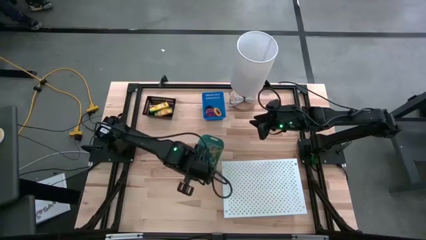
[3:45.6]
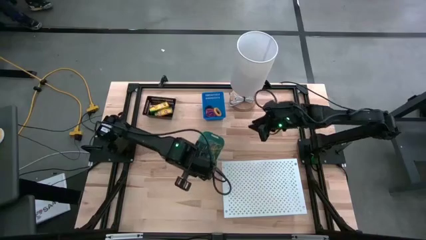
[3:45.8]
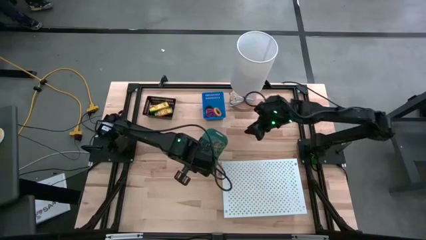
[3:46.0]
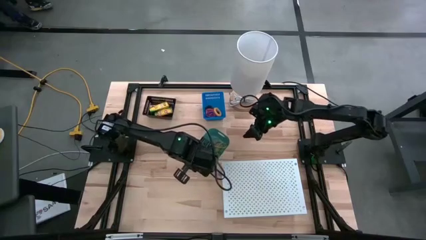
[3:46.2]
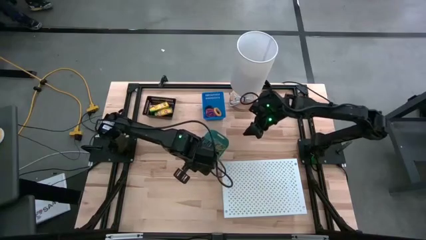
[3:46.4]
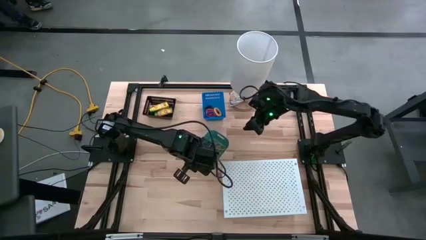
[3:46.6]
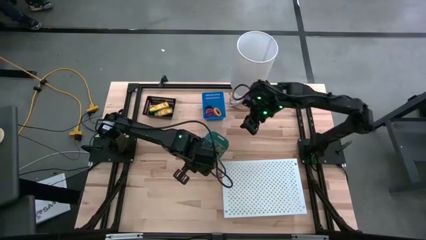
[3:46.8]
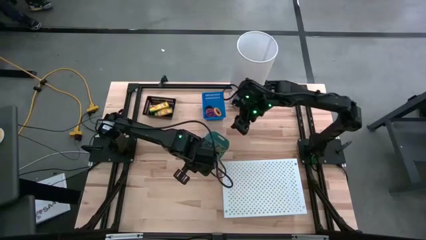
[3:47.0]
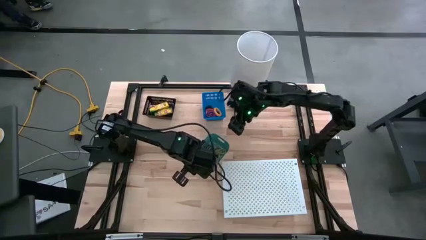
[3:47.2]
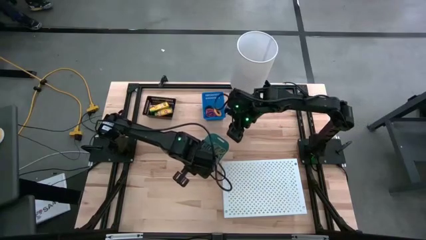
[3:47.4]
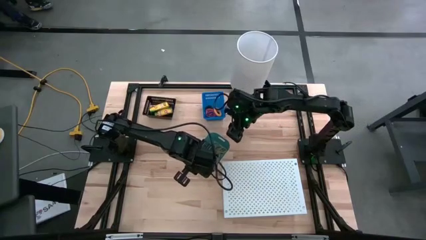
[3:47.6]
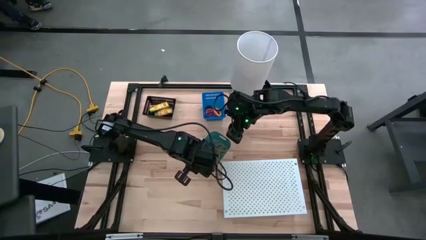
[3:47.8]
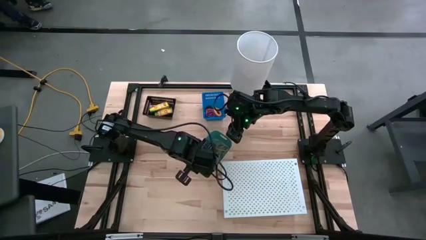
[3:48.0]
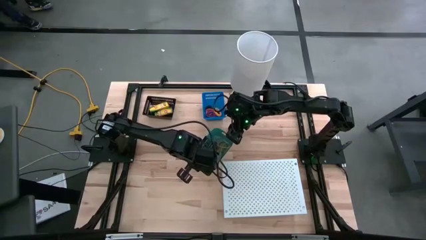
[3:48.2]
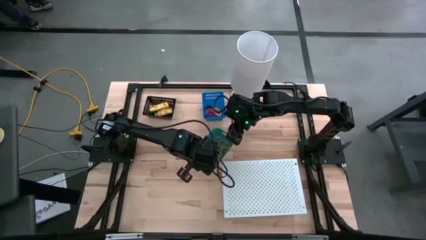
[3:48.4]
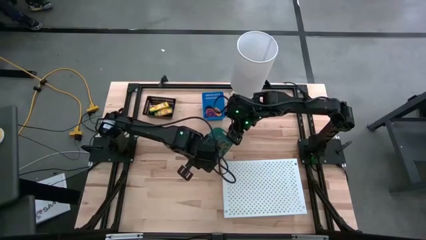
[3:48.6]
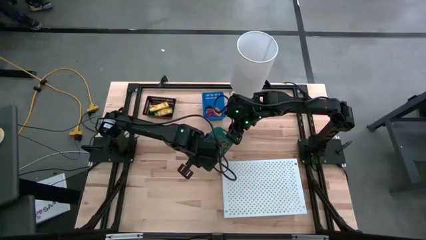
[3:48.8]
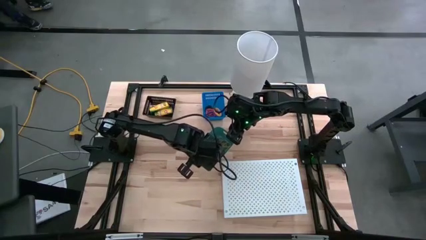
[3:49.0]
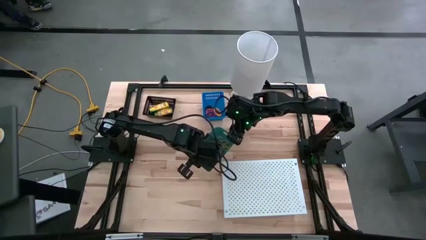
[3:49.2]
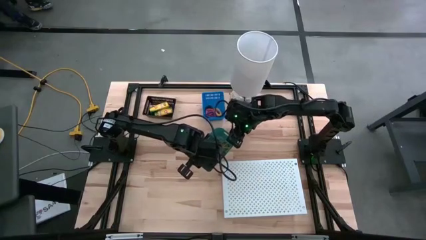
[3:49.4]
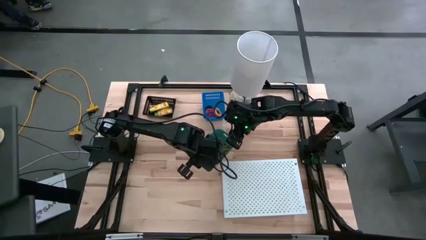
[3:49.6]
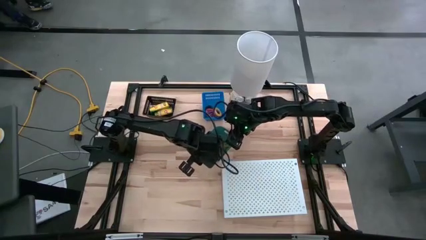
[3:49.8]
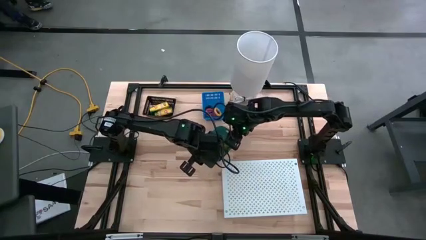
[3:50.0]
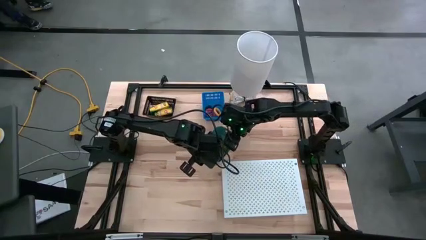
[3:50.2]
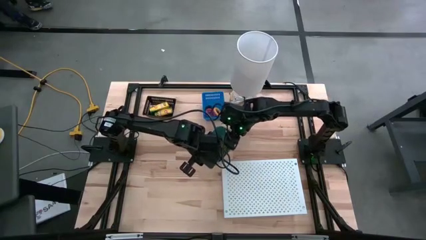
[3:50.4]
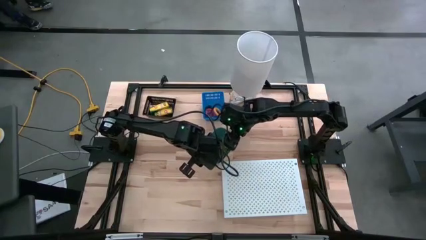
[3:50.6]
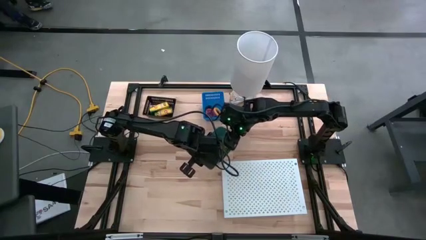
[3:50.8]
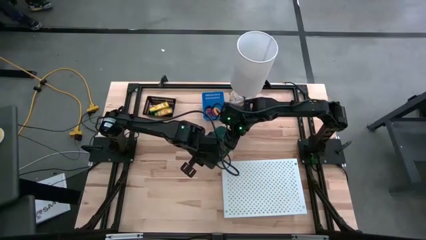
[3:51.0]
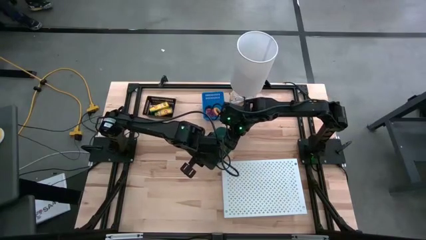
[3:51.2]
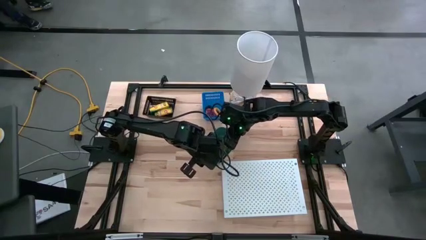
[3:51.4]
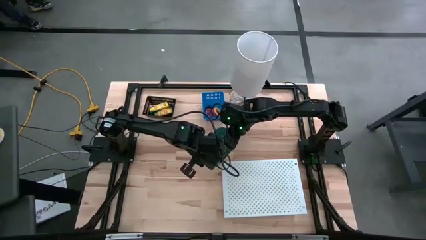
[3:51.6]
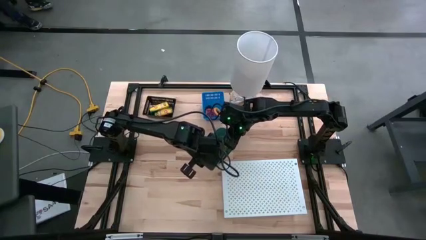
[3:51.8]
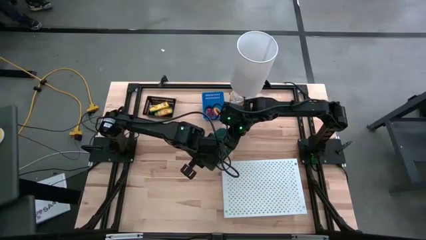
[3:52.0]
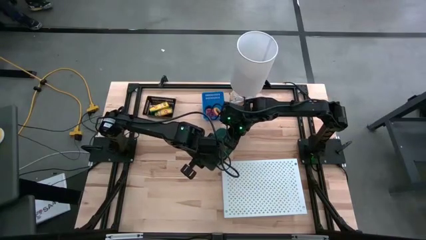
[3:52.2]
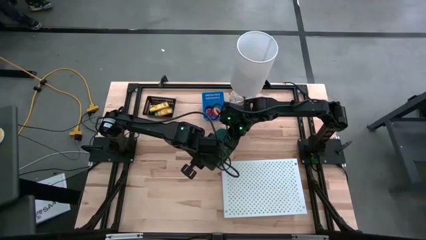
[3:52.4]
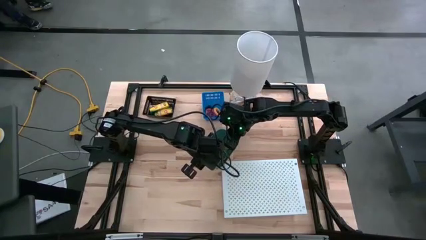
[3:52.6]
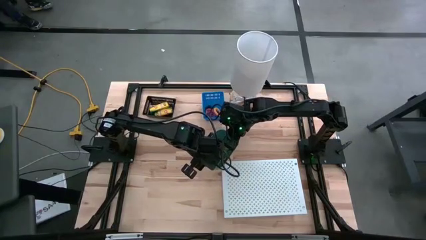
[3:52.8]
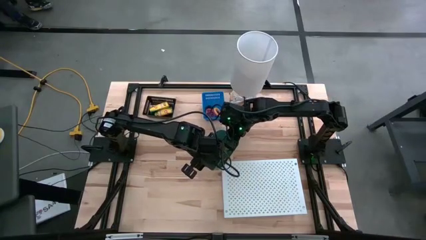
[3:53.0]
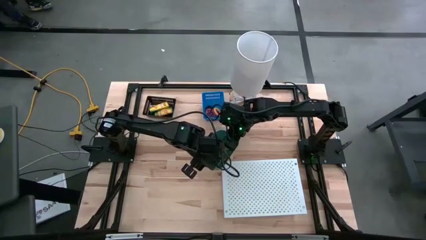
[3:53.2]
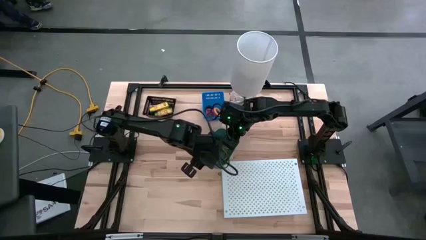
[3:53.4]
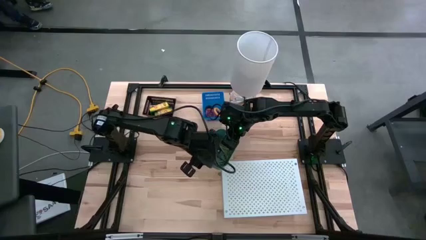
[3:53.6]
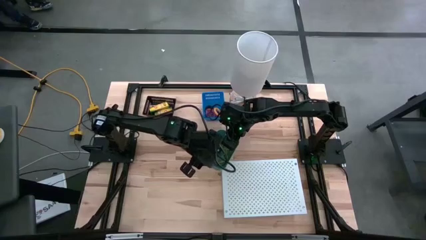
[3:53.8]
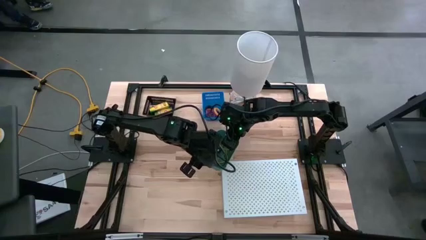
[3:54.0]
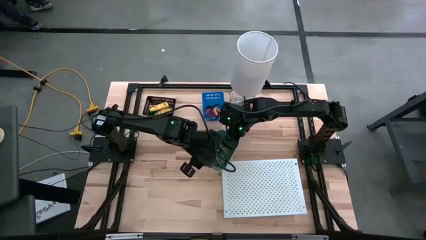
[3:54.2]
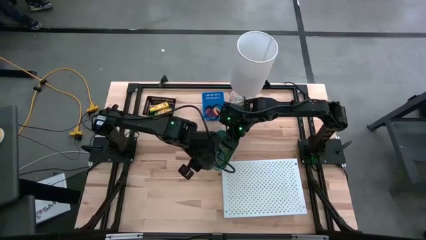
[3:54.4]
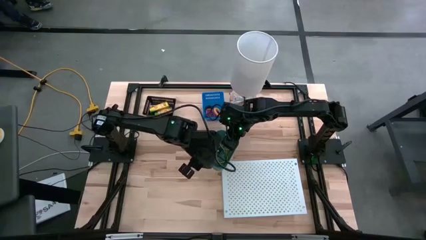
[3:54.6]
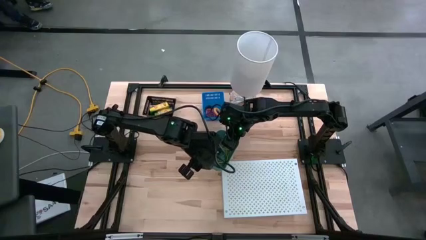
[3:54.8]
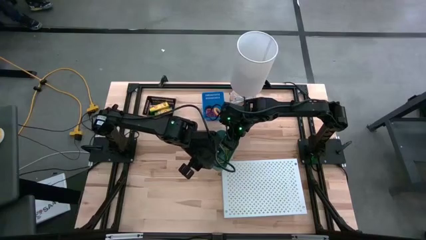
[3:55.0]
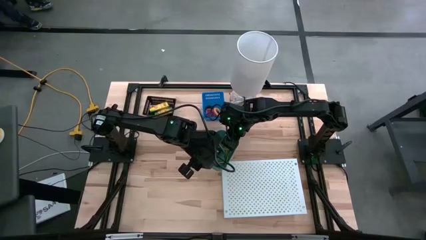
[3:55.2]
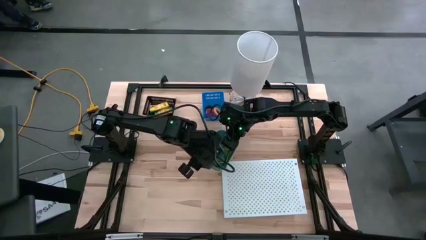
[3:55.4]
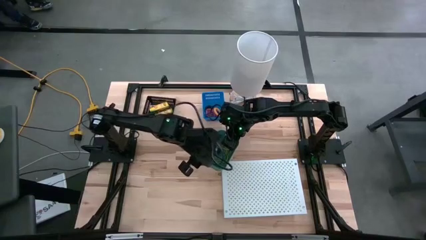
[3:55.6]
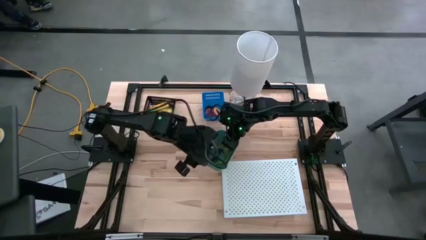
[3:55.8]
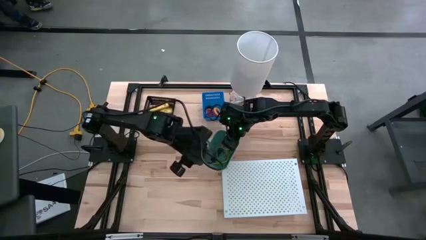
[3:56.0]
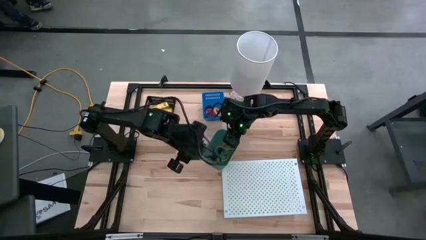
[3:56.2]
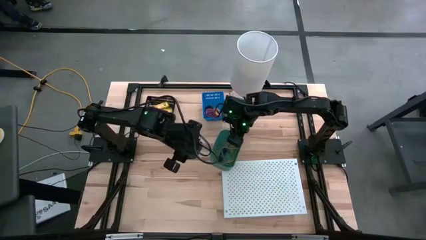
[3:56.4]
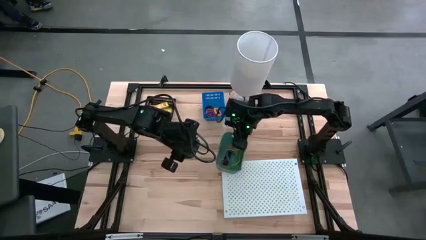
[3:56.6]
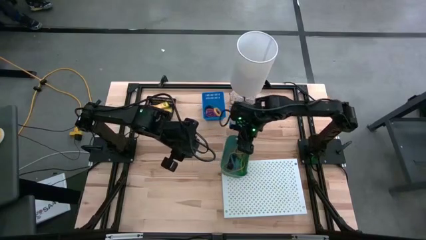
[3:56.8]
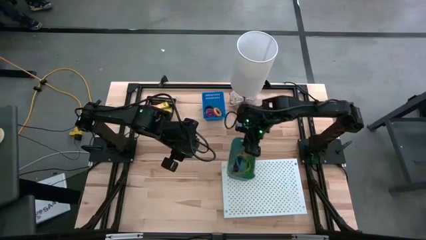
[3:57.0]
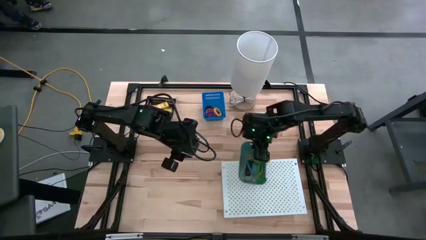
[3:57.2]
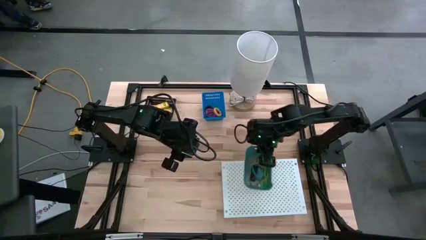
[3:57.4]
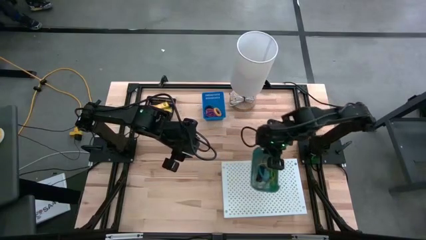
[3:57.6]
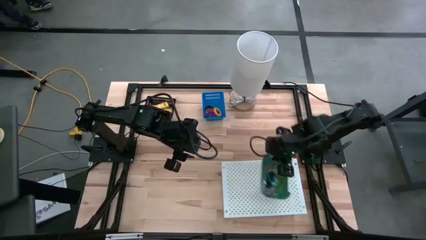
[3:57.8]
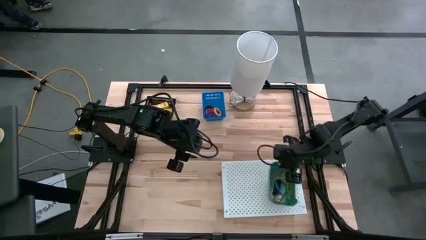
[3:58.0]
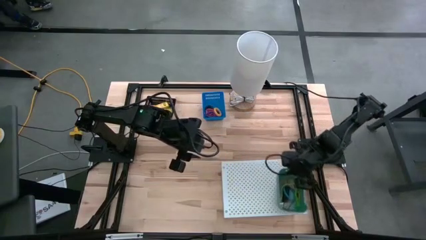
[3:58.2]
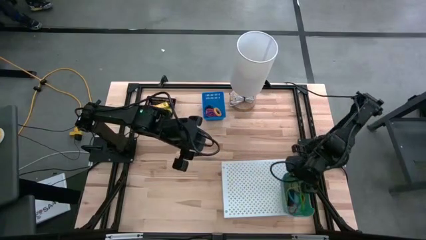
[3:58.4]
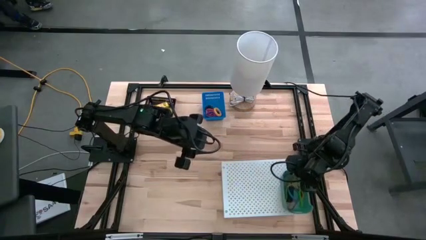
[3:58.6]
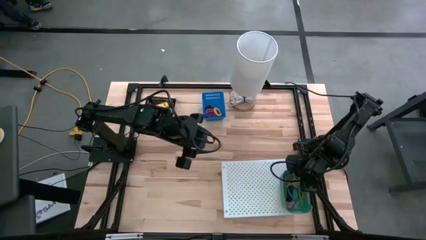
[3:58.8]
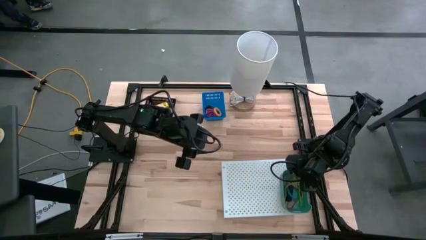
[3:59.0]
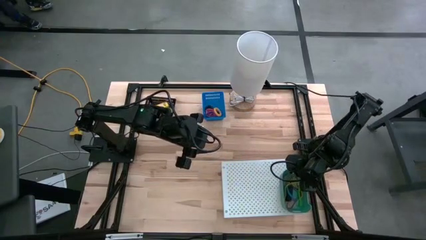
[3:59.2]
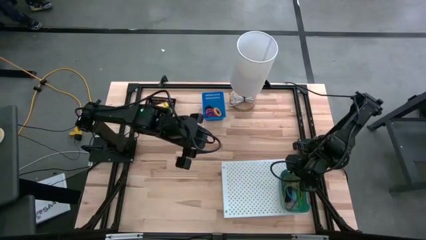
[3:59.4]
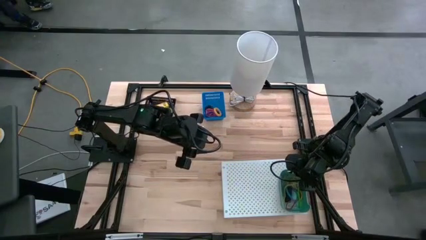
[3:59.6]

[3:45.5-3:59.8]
Task: Pick & Place Office Desk Supplies
Put the green bin with the rubber bands on the shelf
